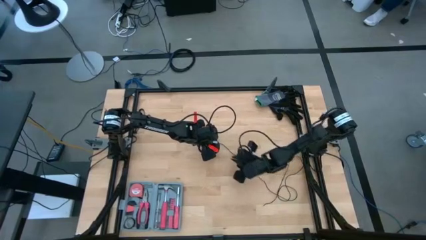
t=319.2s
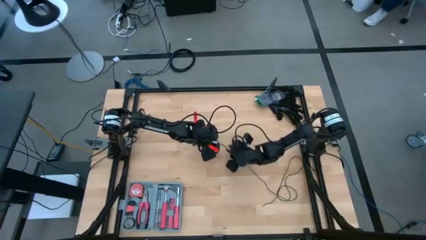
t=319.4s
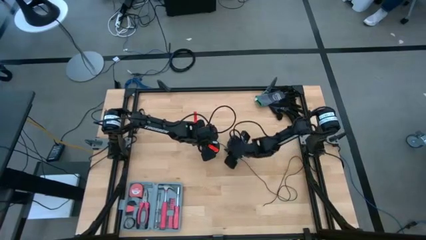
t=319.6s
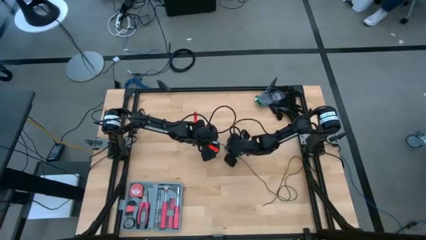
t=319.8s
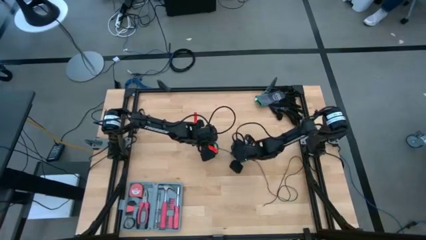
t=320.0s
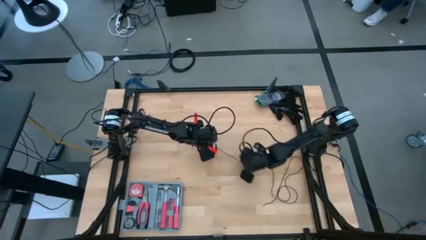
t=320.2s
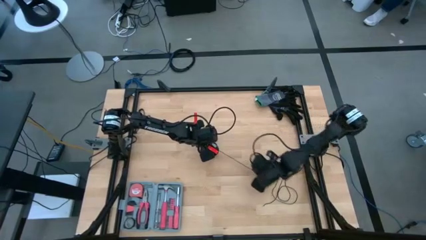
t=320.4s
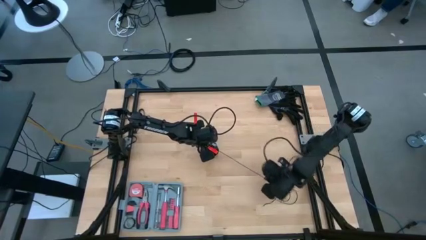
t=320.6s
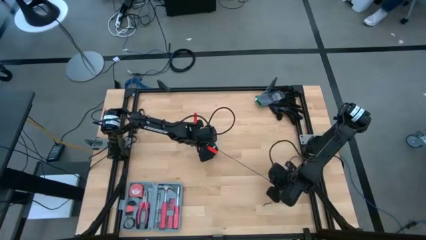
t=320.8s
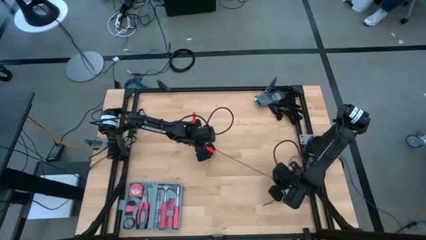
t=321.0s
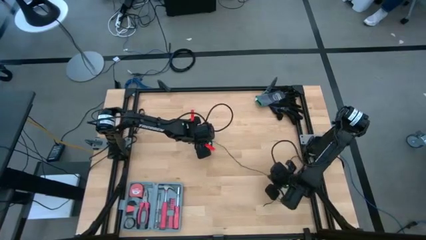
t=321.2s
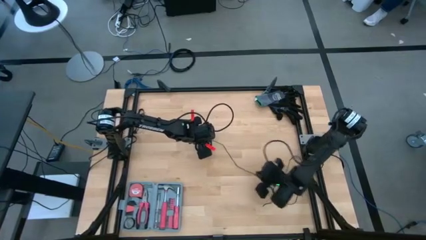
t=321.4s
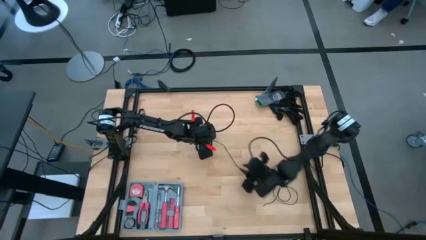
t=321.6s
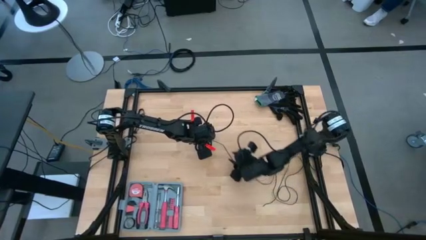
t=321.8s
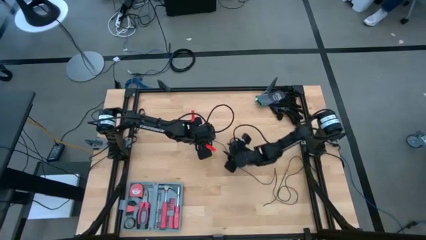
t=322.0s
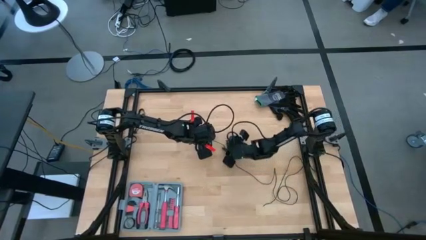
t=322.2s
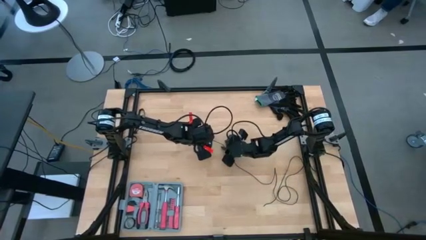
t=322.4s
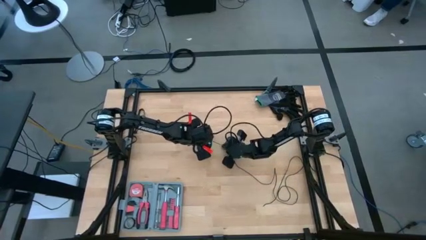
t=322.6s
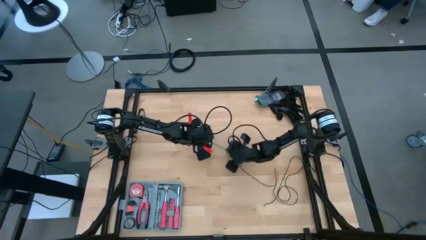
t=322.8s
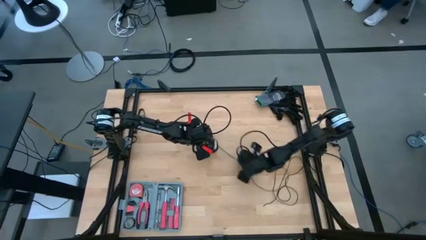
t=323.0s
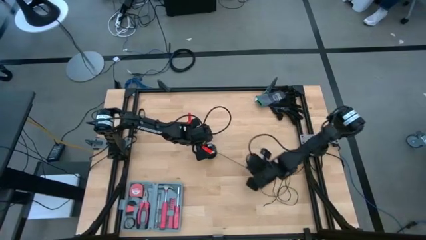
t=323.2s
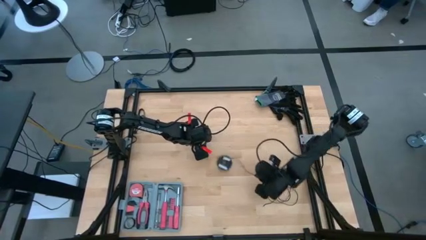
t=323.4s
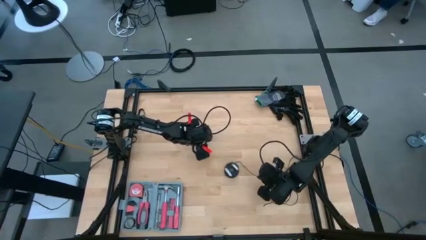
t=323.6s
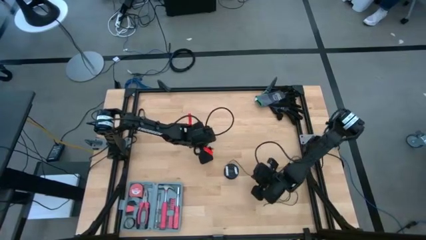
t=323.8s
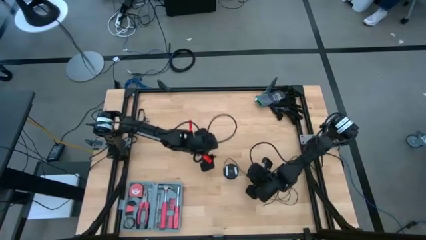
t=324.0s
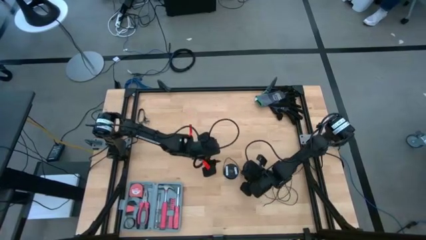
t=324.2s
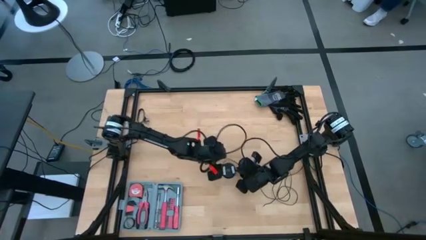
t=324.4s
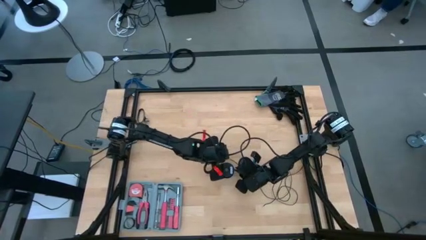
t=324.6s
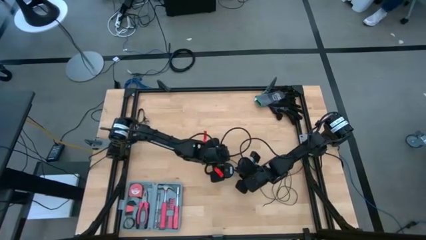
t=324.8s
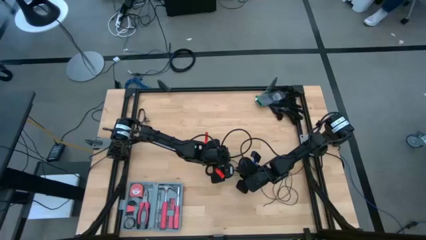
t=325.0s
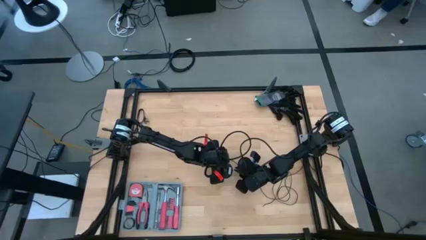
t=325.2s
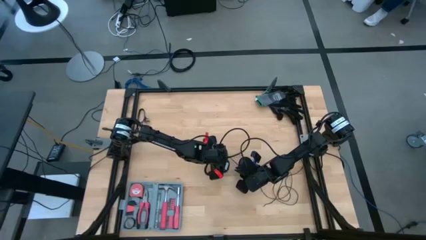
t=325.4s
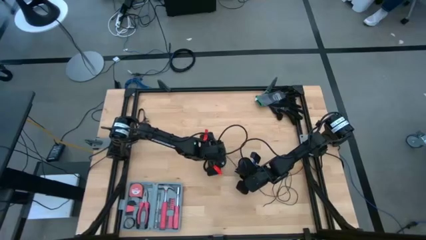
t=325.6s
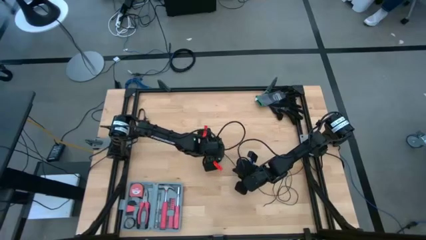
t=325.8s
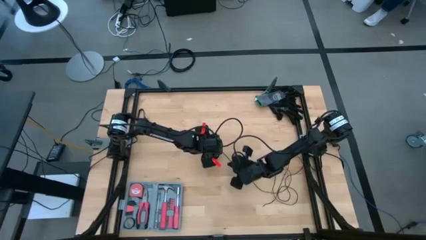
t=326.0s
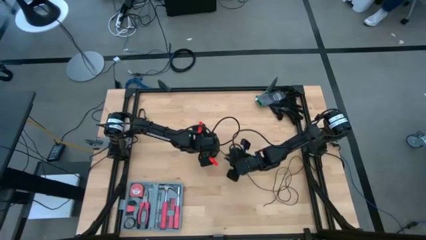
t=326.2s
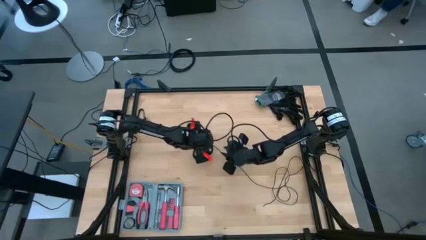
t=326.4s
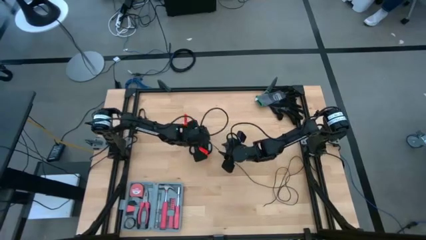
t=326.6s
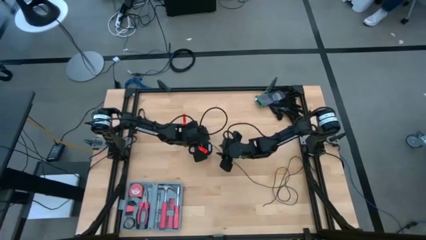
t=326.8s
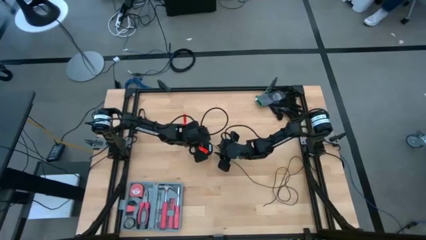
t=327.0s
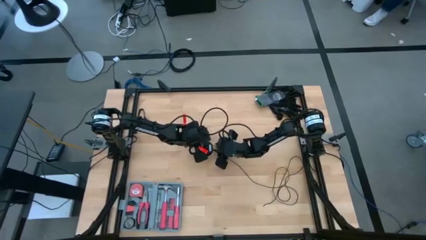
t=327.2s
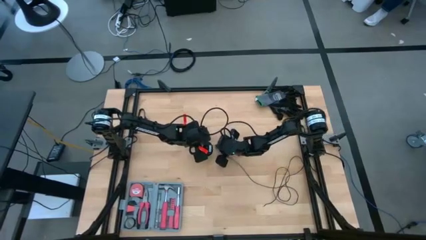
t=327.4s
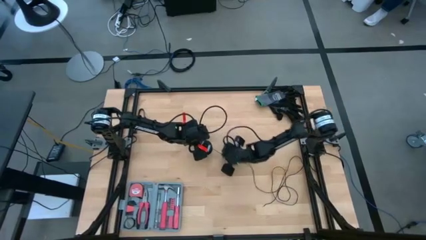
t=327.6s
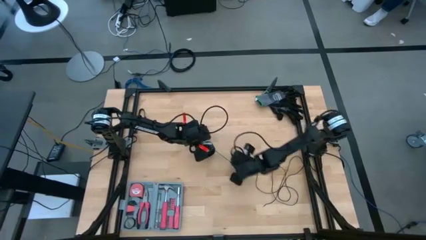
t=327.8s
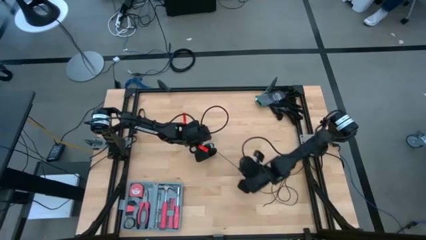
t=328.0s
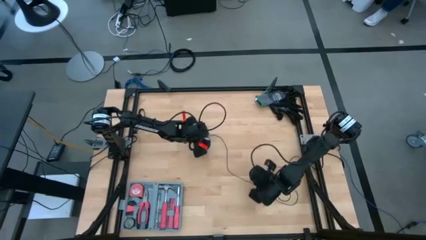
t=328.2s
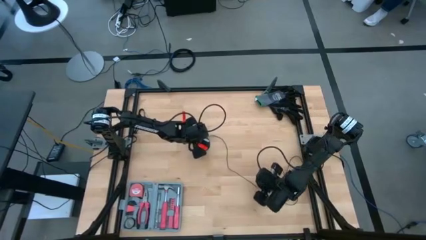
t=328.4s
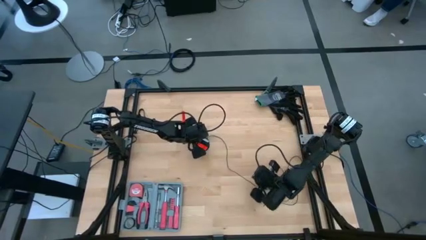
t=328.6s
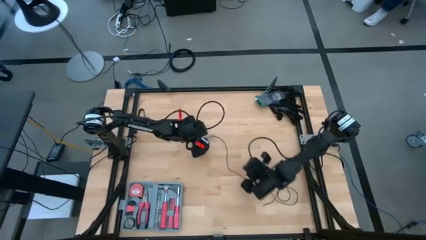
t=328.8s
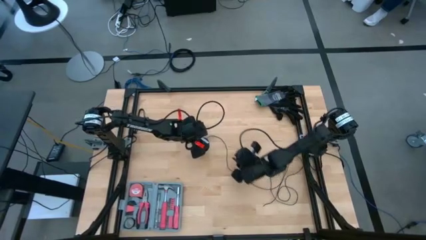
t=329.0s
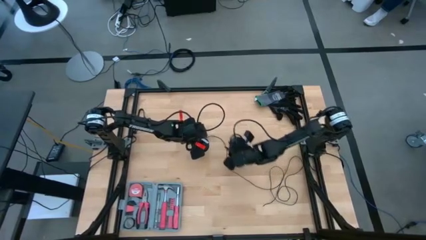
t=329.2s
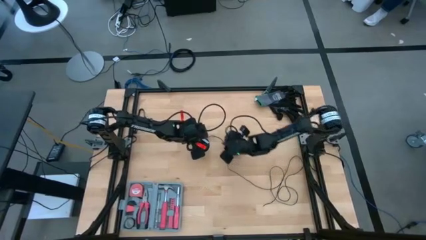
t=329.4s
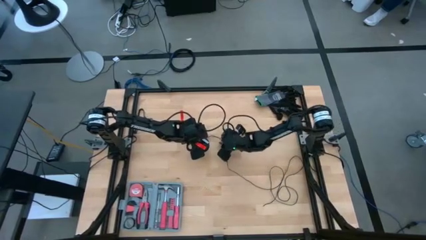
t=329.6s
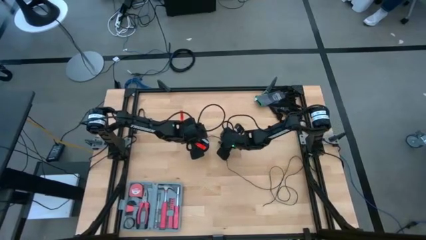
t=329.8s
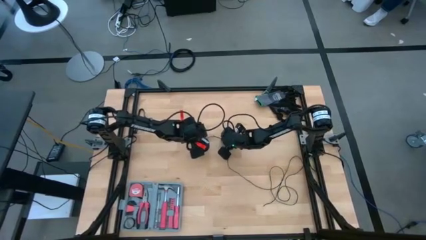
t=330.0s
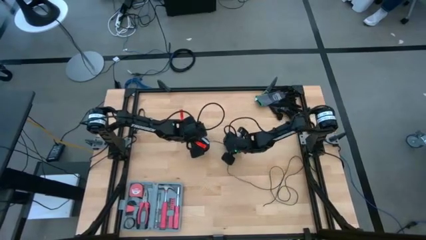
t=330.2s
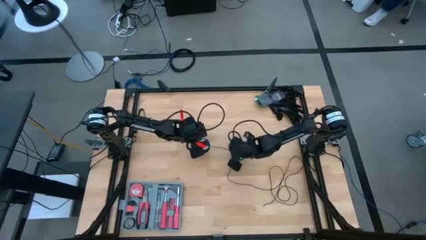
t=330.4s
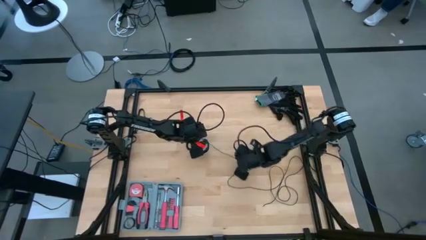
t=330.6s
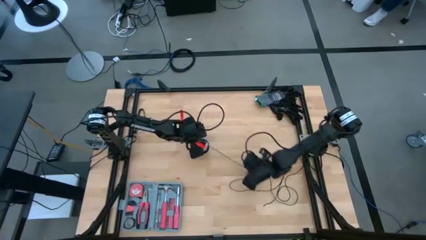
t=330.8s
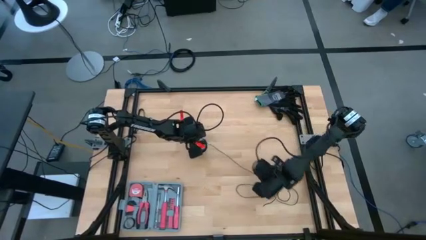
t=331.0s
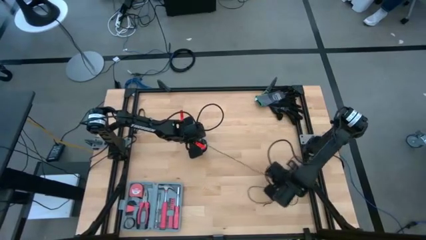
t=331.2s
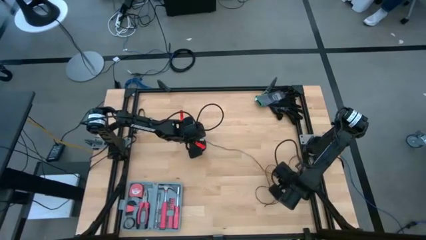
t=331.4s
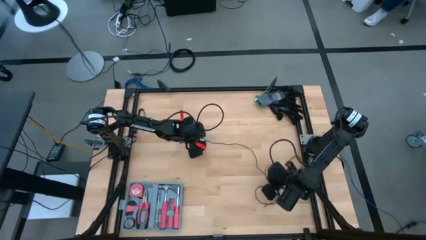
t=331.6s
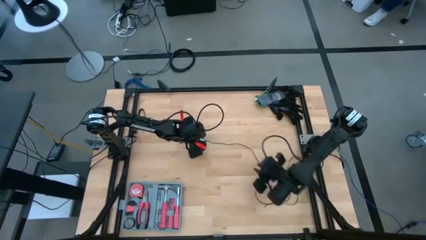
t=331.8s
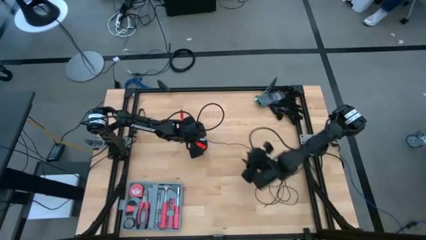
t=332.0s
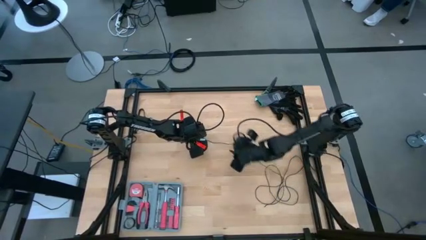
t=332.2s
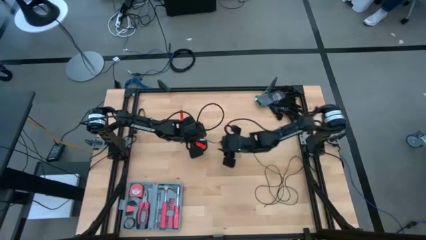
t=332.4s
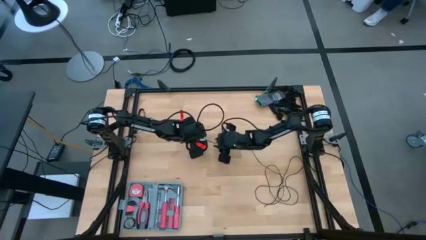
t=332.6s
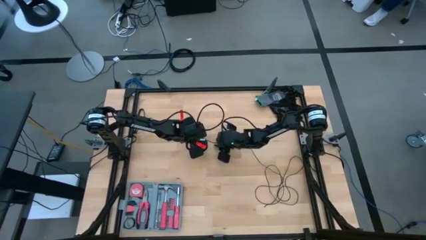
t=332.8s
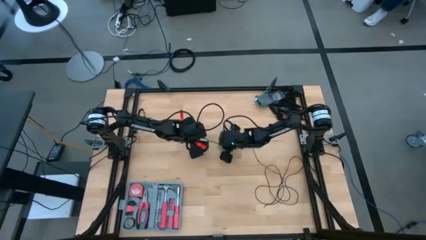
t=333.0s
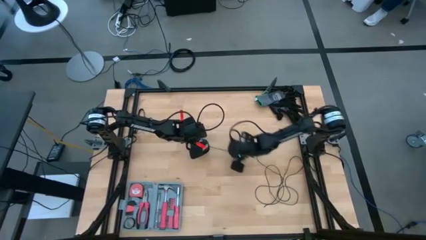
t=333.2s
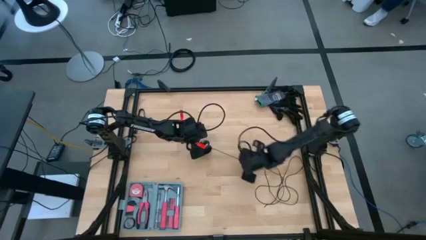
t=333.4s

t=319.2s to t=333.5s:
Task: Coil cords
Uncoil the black wire from the spool

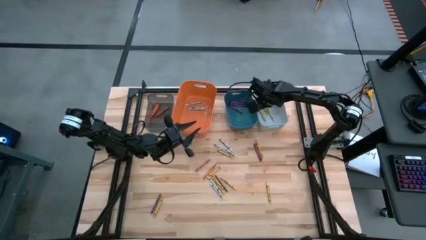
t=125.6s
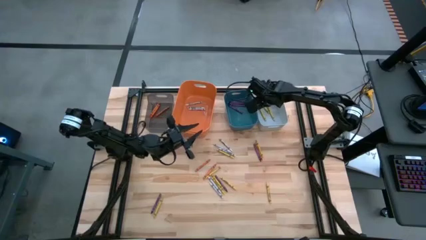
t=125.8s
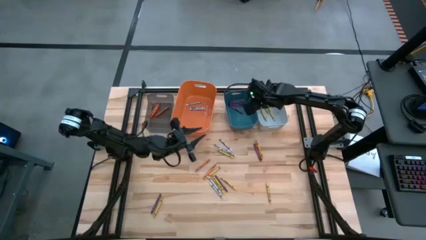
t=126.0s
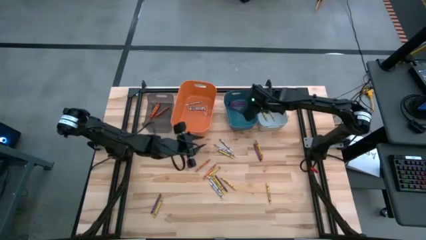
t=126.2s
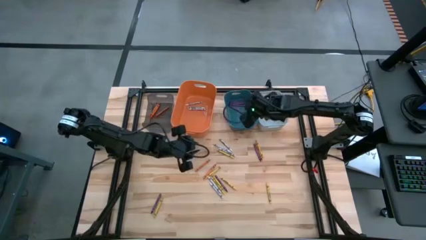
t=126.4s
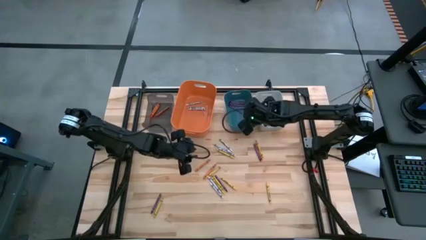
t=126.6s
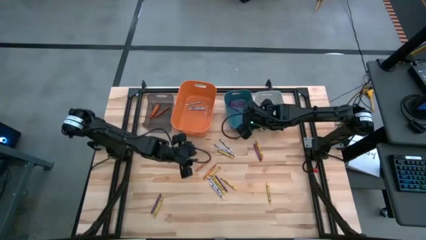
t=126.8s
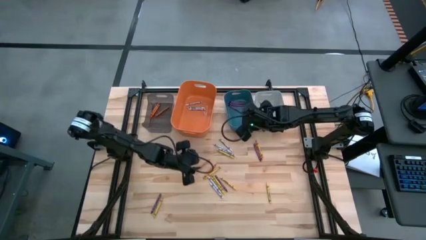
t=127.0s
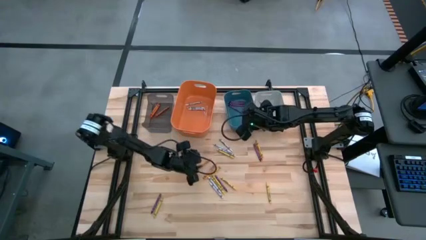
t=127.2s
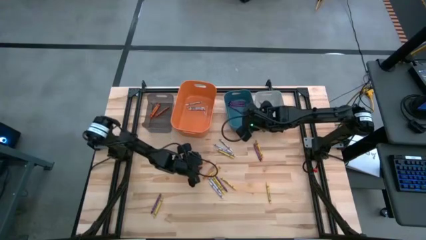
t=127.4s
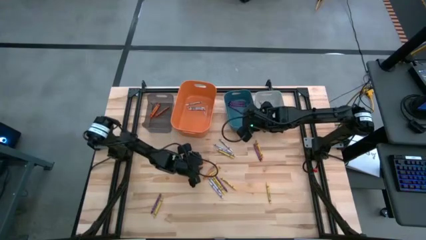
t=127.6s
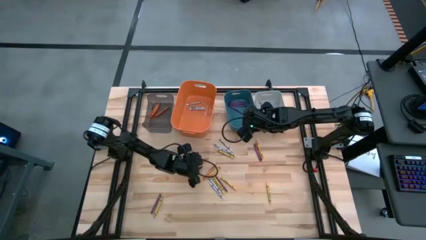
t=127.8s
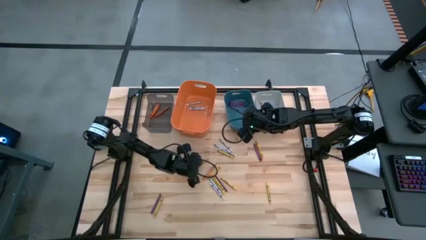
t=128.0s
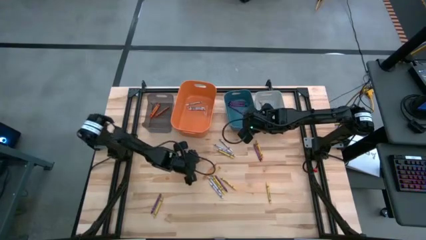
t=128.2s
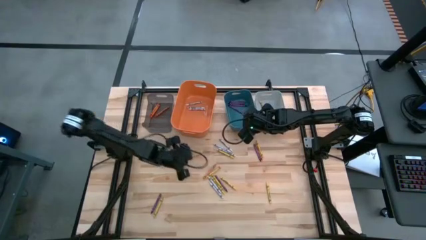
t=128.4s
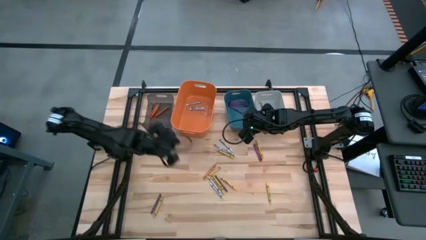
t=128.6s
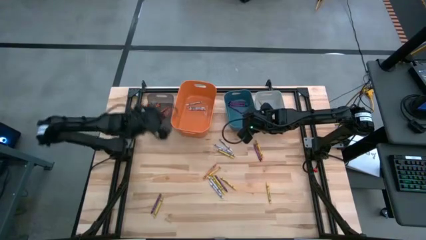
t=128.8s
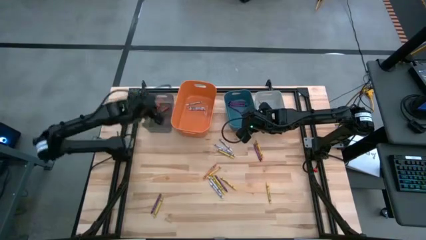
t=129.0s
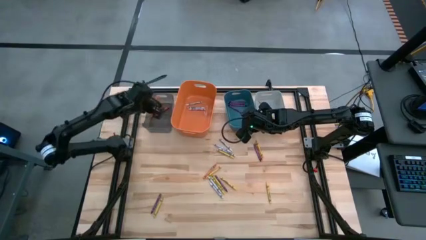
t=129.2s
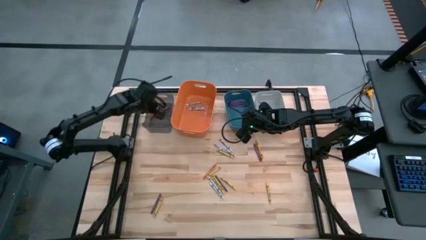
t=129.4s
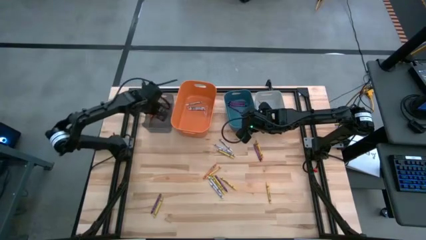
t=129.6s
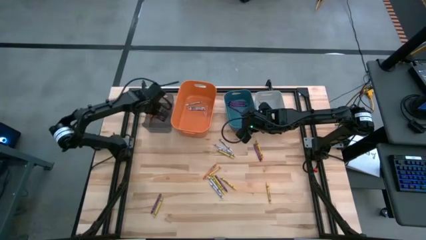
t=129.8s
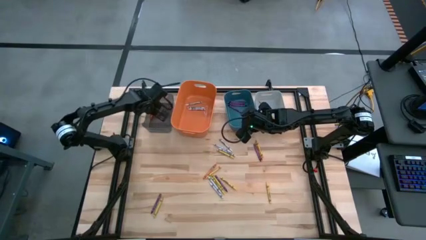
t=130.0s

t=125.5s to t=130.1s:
Task: Sort crayons
Put the orange crayon into the black bin
